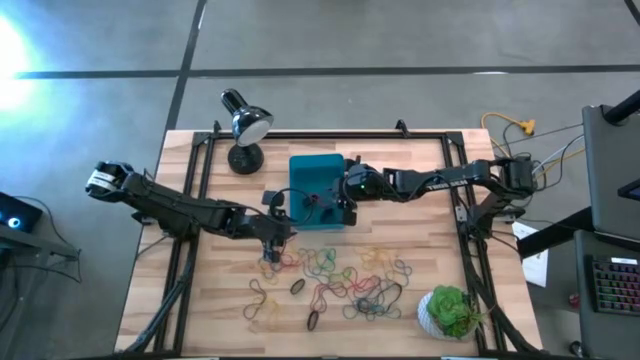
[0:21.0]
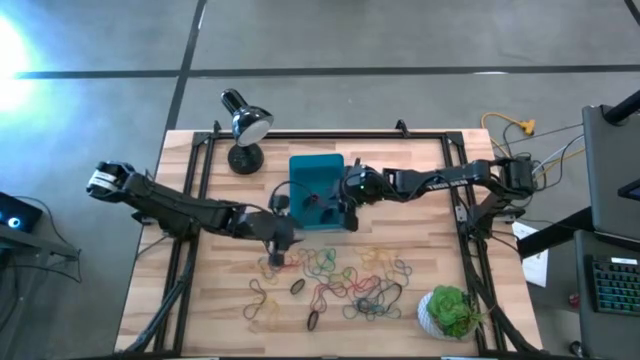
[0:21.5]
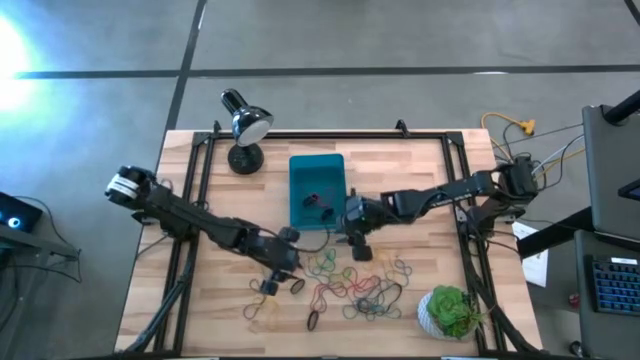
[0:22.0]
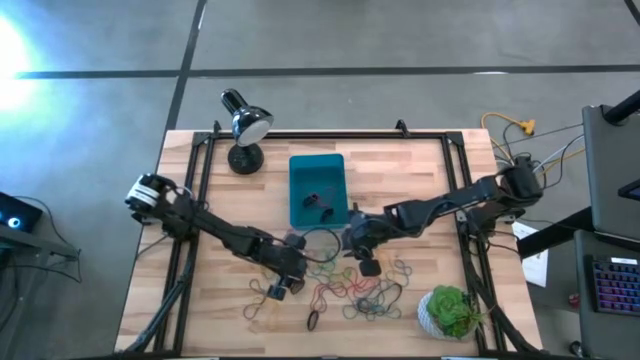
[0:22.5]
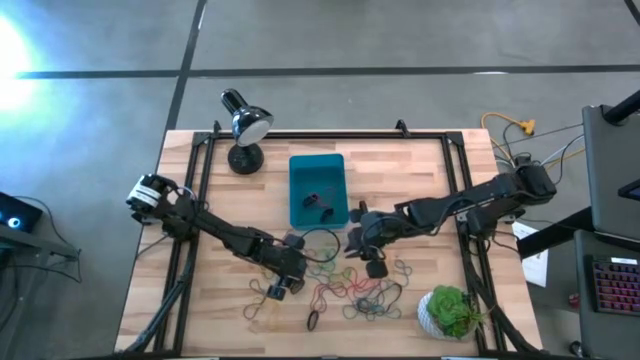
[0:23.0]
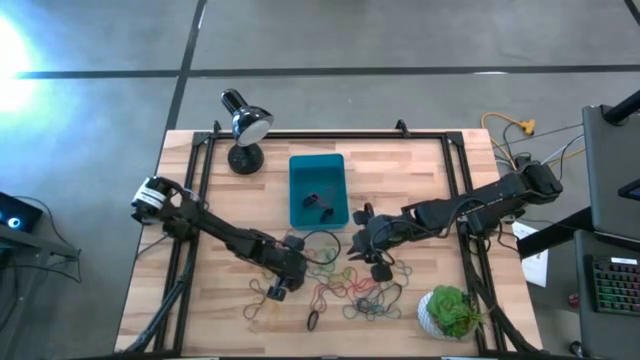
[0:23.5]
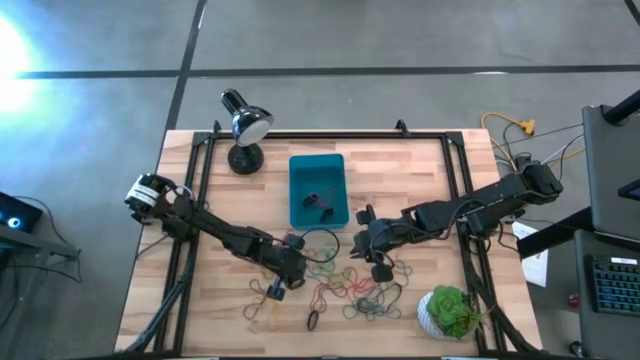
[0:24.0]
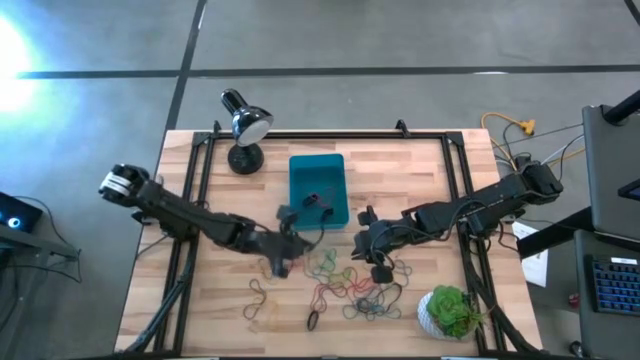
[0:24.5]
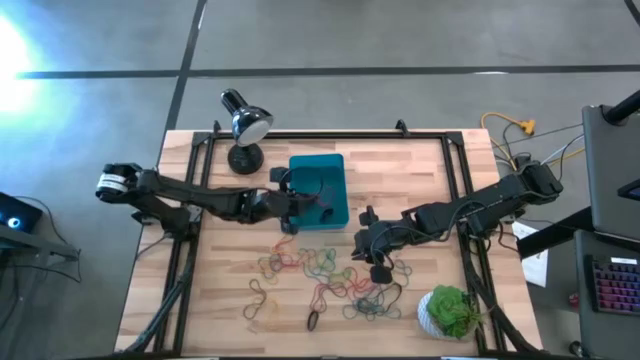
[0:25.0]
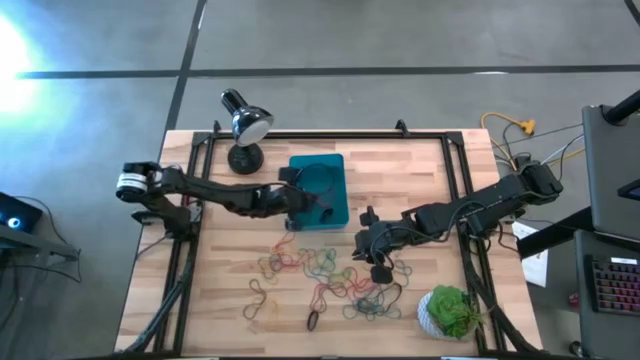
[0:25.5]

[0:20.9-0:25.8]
Task: Pick and place rubber bands into bin
Put the black rubber band into the blue bin

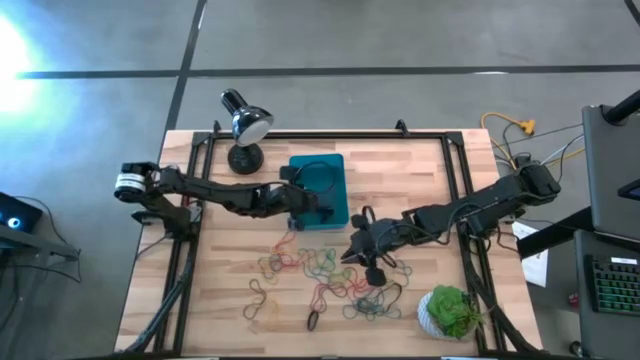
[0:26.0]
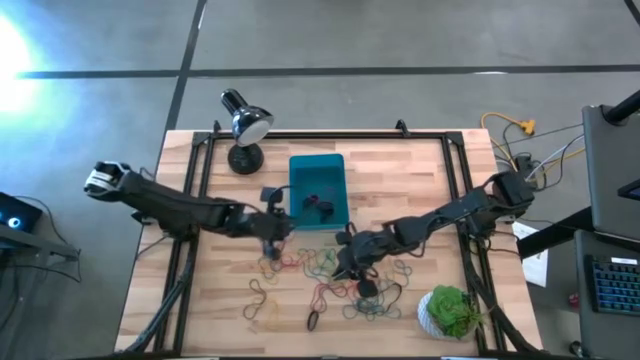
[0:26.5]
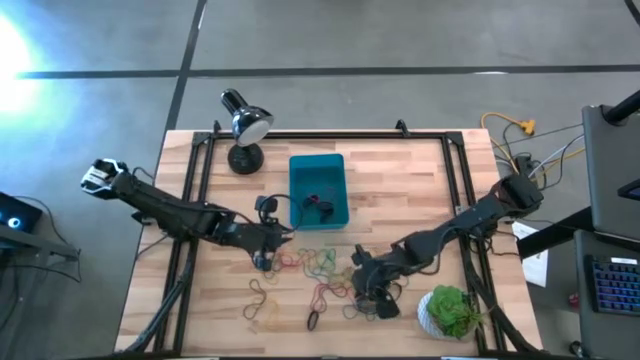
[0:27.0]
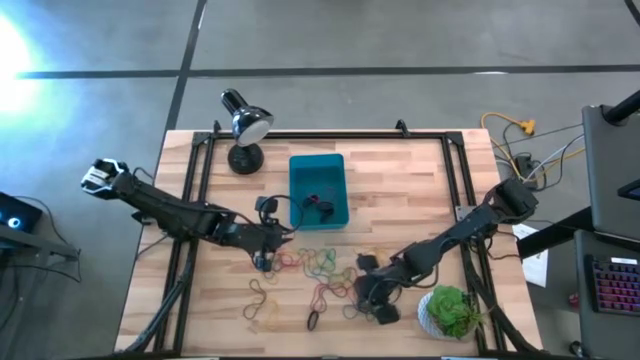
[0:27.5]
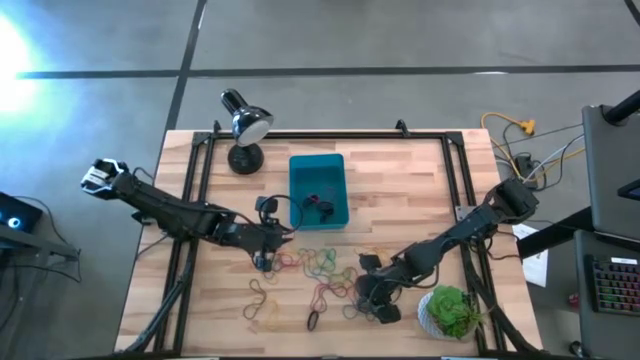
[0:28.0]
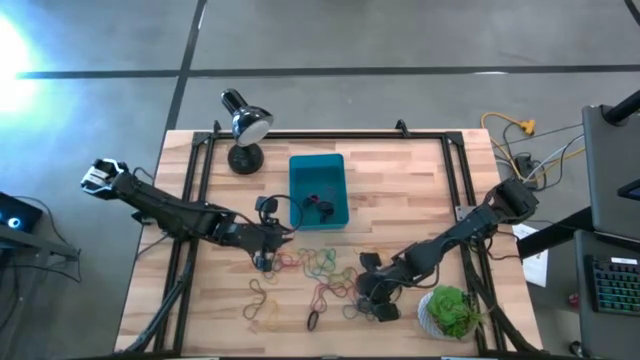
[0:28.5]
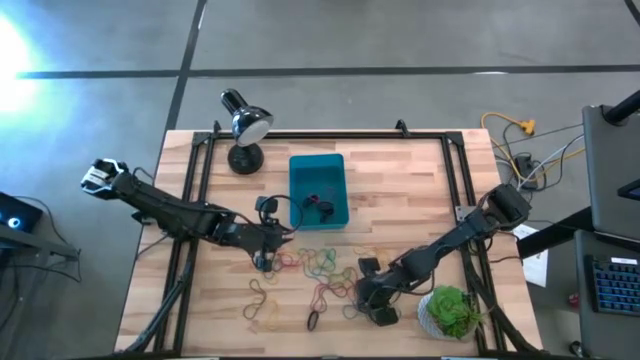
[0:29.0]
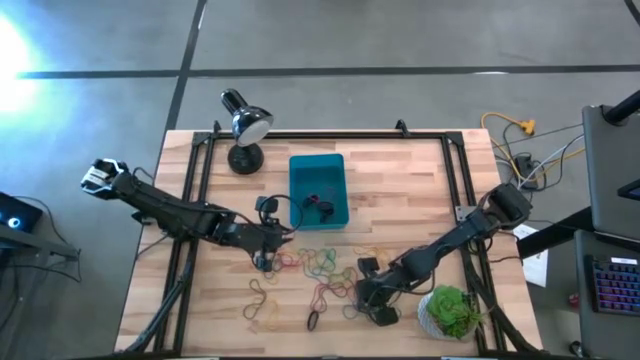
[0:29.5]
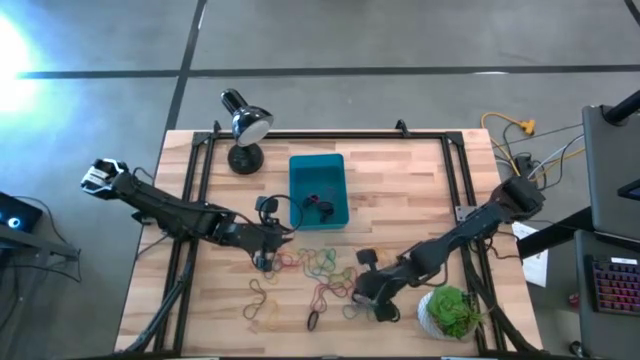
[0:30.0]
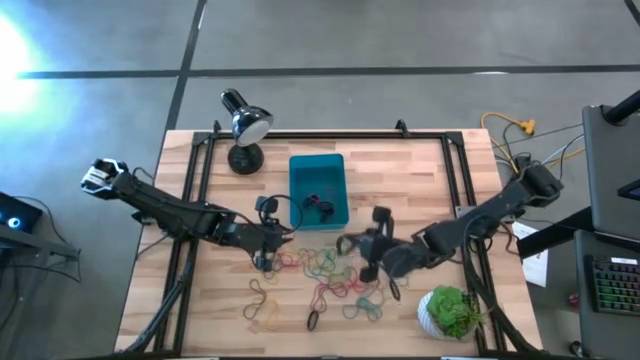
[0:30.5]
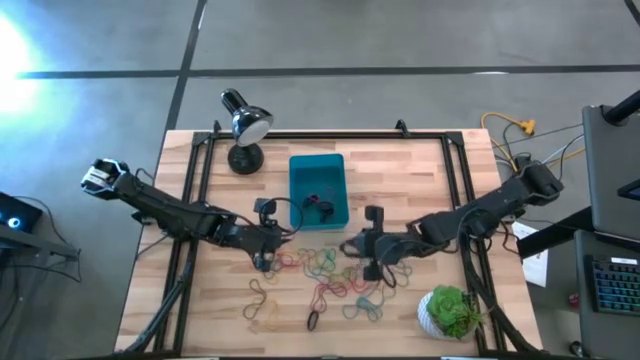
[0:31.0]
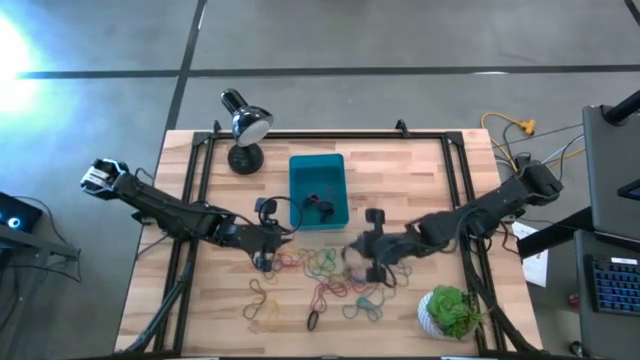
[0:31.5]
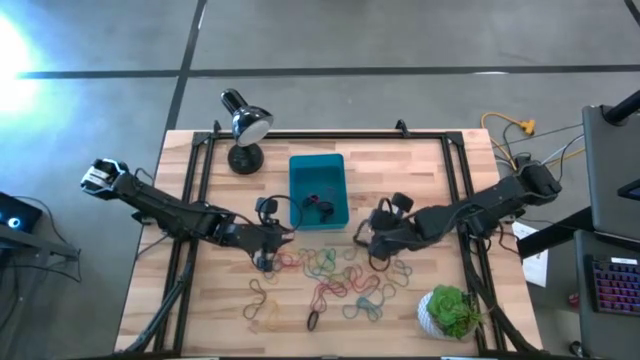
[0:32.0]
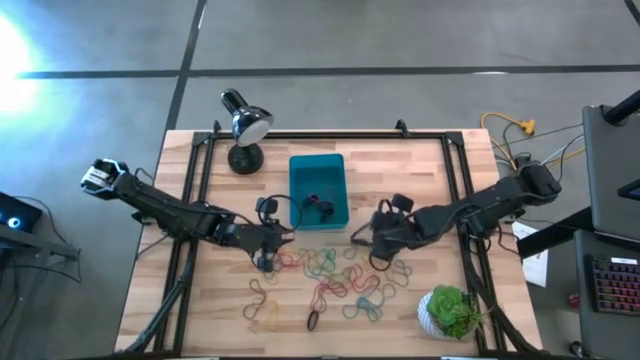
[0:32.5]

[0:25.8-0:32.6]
Put the black rubber band into the blue bin

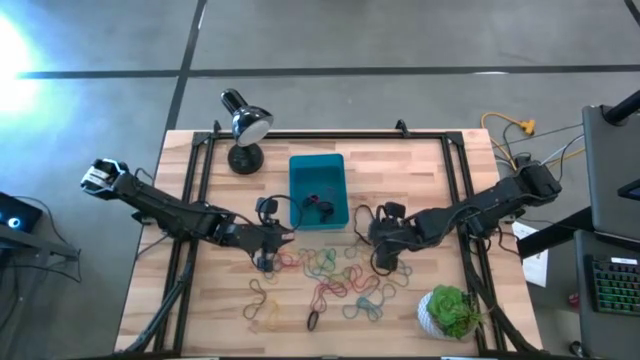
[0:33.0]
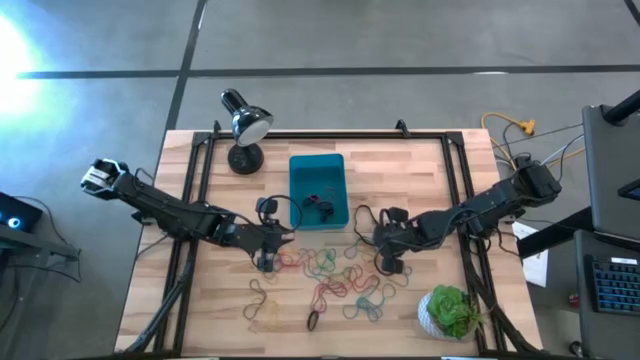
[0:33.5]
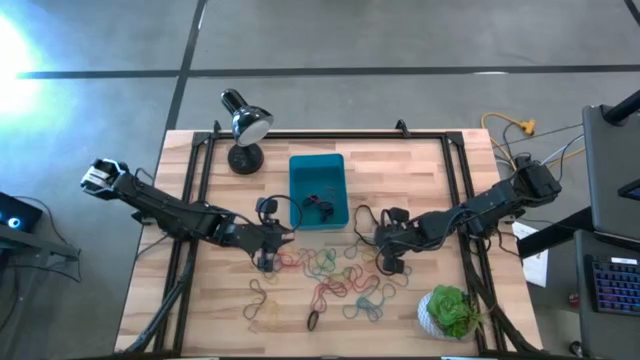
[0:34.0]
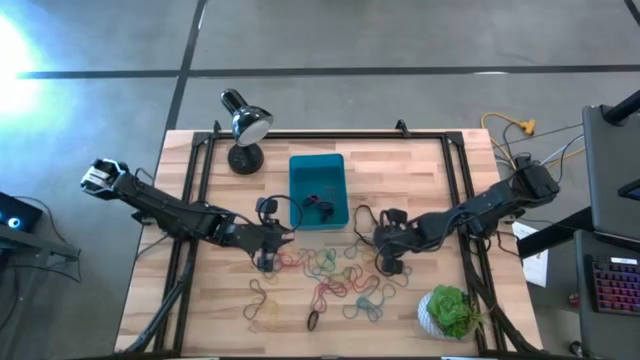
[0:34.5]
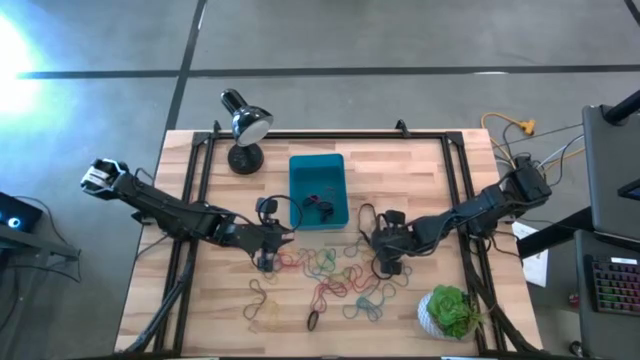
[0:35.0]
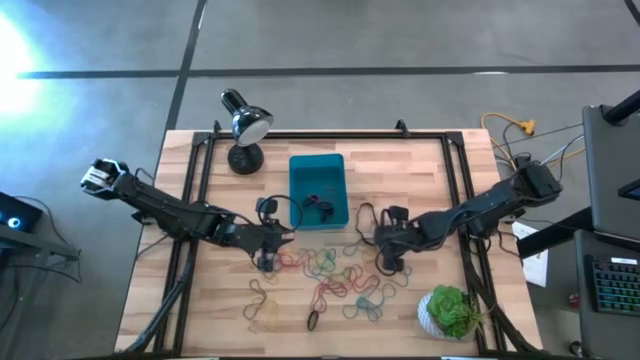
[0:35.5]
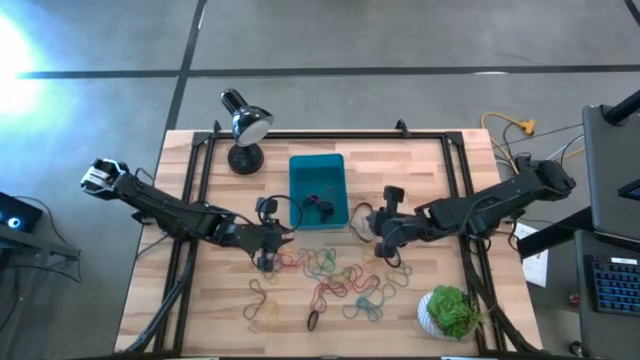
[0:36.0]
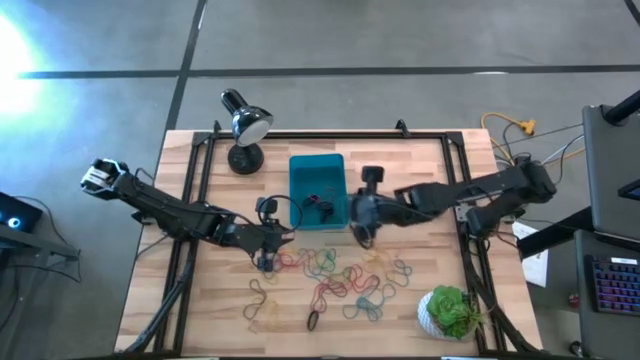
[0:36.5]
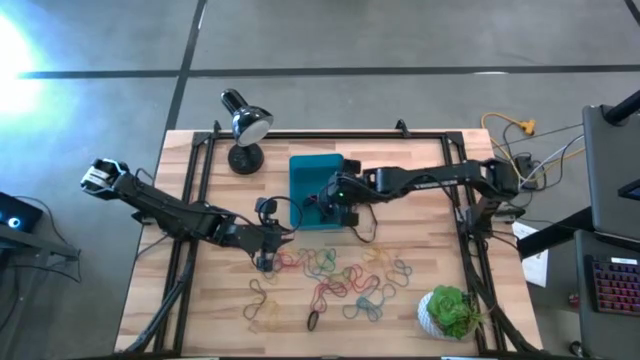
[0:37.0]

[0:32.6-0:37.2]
Put the blue rubber band into the blue bin

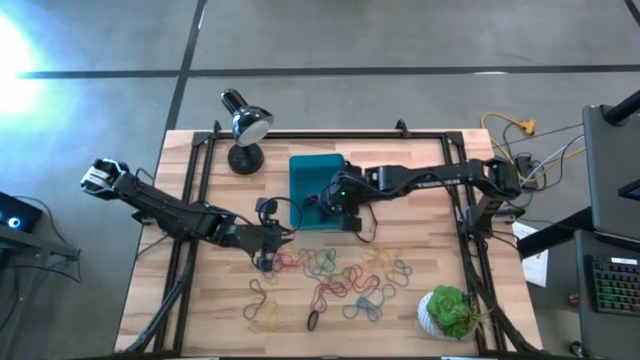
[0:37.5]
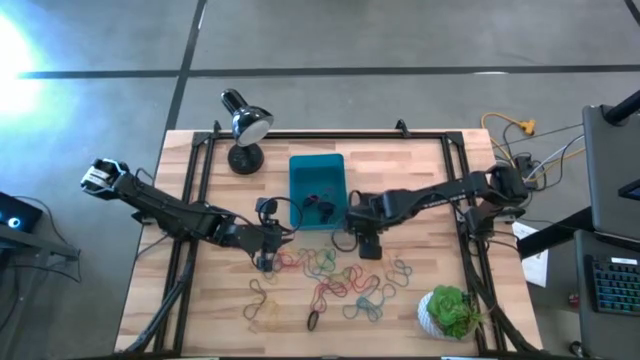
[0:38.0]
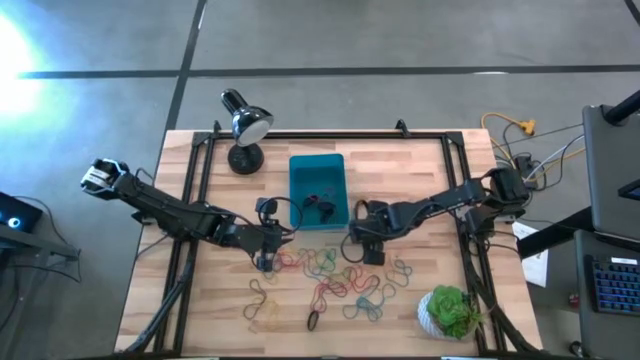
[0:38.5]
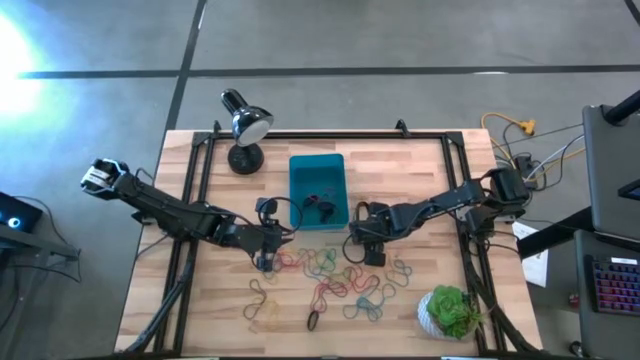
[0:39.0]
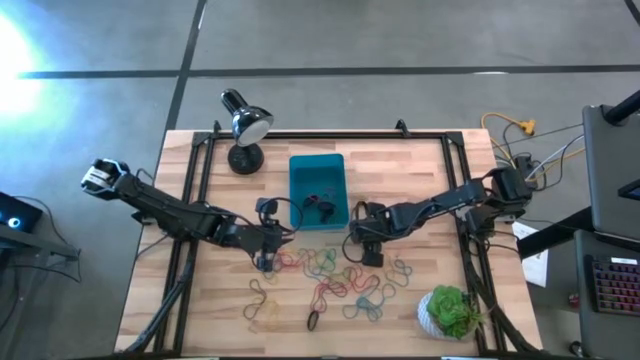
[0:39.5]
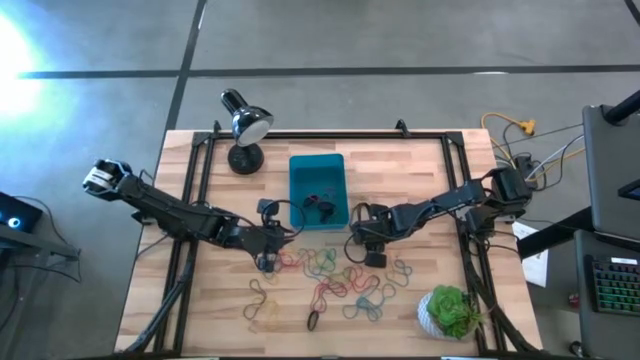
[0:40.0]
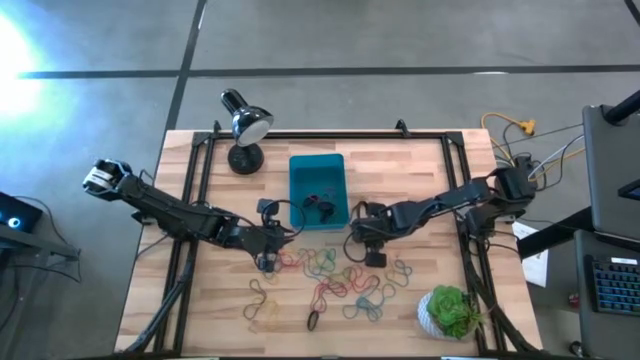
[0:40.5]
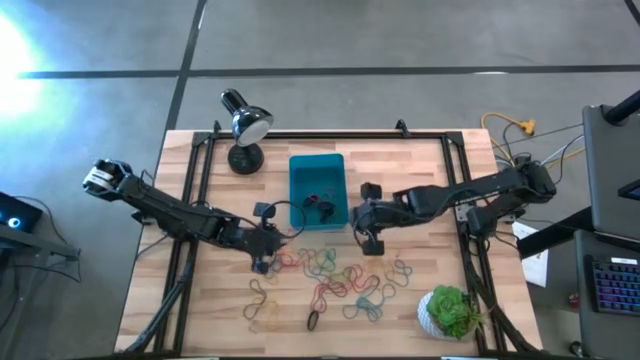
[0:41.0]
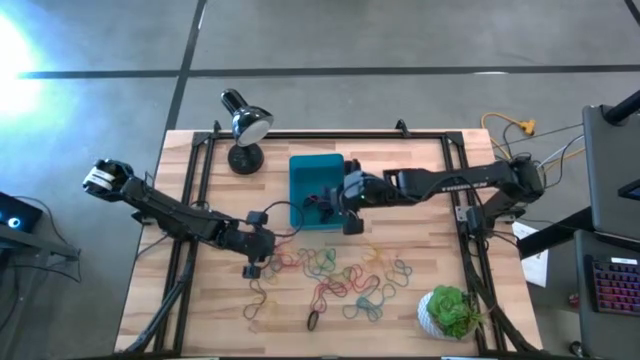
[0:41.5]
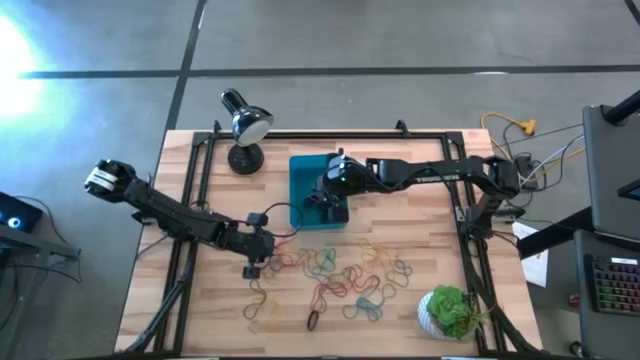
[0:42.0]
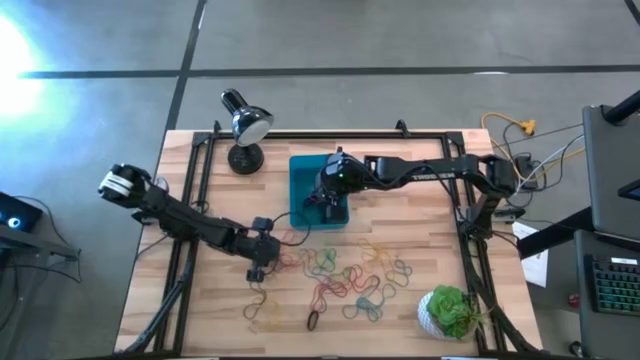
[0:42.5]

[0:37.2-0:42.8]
Put the black rubber band into the blue bin

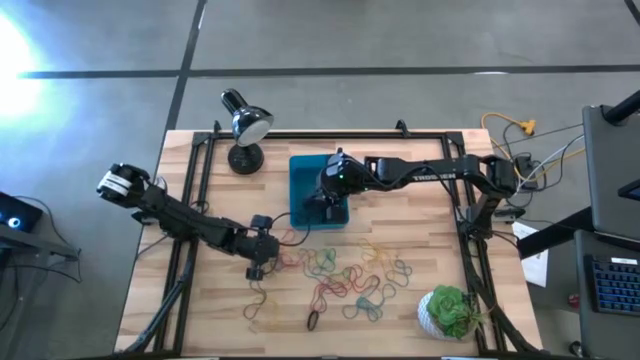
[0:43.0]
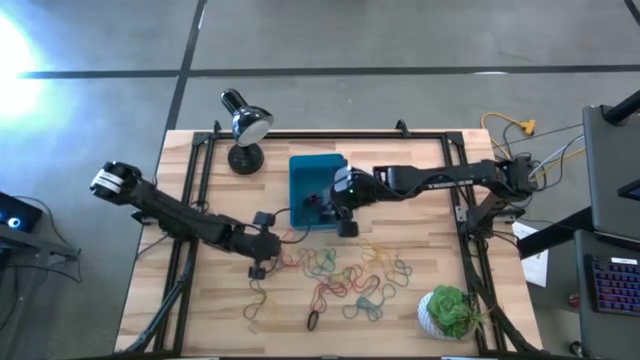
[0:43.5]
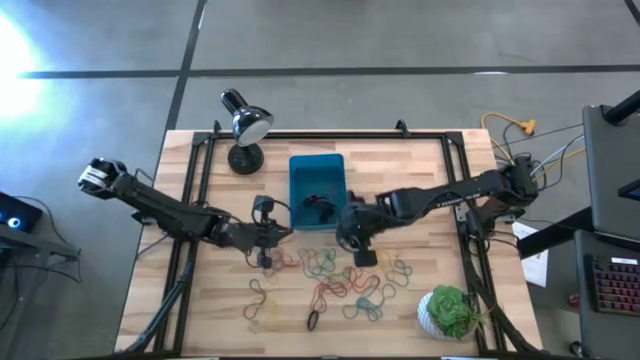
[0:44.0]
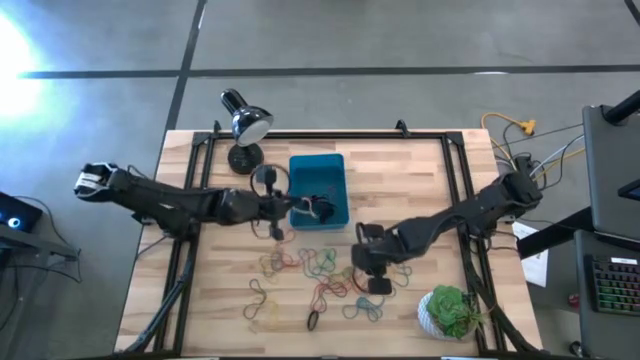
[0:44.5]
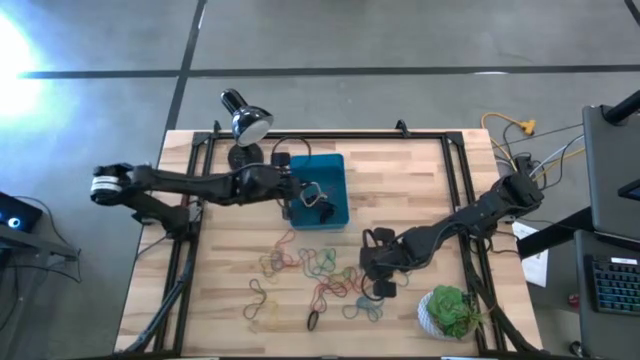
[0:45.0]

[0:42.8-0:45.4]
Put the yellow rubber band into the blue bin
